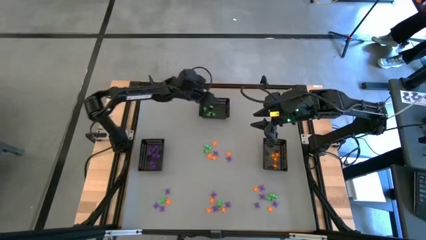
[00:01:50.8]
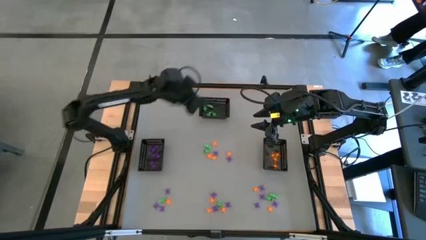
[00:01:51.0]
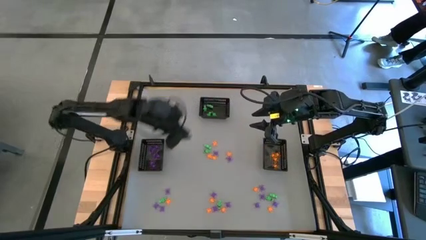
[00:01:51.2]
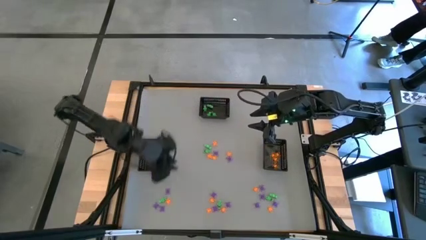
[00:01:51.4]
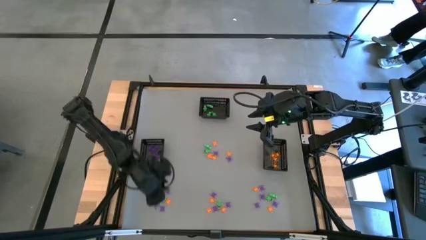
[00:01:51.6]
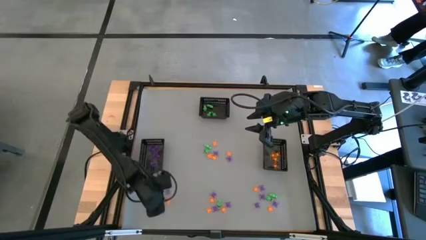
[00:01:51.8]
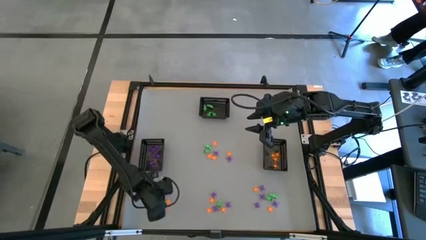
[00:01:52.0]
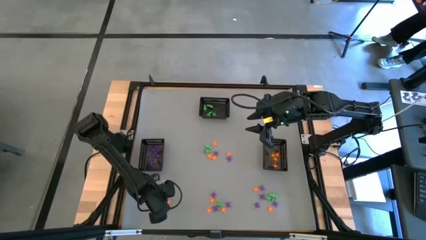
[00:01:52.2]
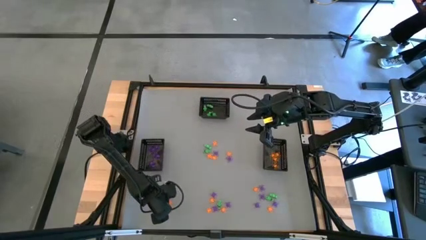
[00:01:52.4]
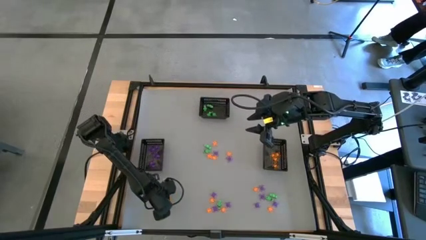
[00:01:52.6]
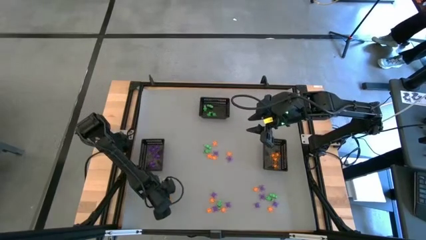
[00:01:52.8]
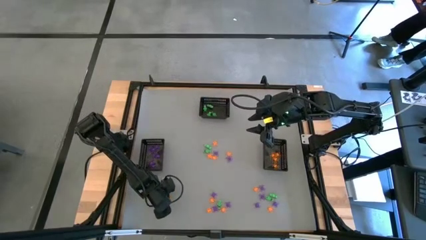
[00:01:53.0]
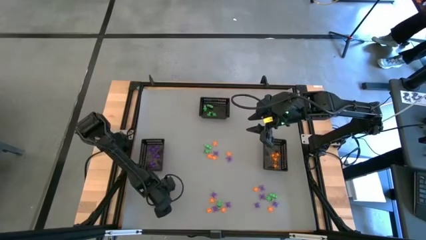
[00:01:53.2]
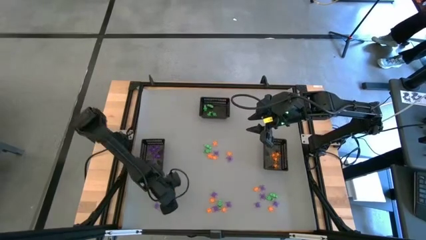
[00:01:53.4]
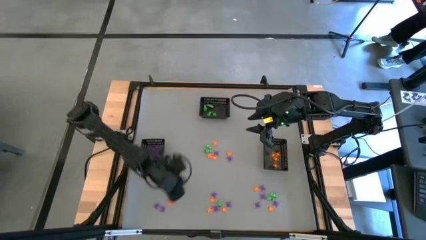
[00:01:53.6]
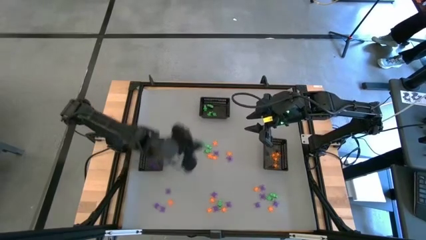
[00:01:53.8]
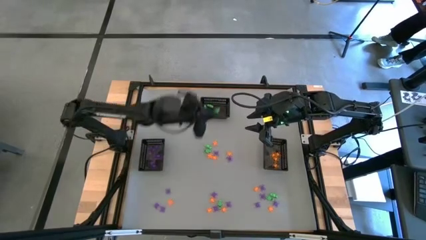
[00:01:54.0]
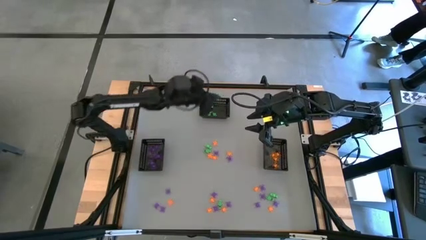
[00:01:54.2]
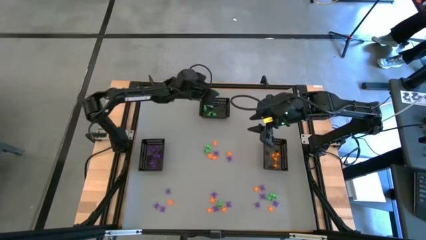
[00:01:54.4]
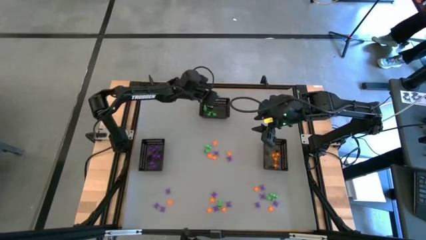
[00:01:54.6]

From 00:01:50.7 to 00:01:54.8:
Task: Sort Halloween decoration
Put the green skeleton toy into the top bin

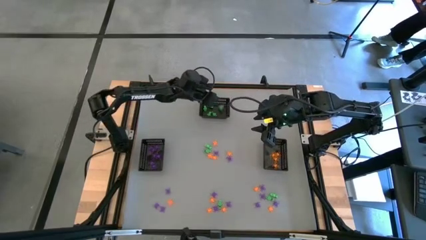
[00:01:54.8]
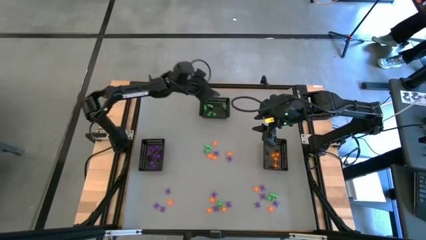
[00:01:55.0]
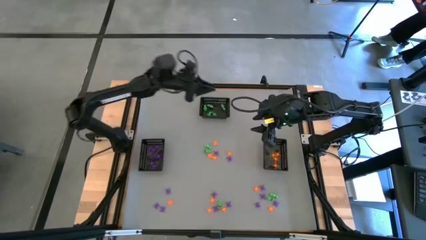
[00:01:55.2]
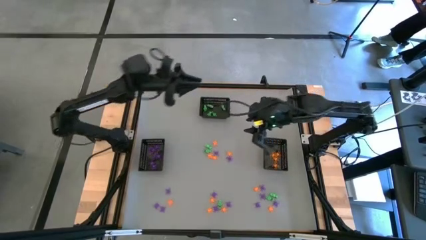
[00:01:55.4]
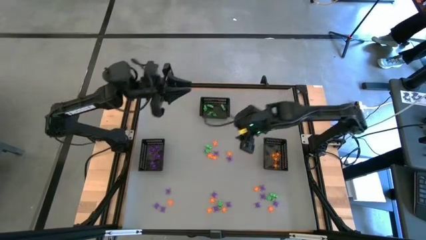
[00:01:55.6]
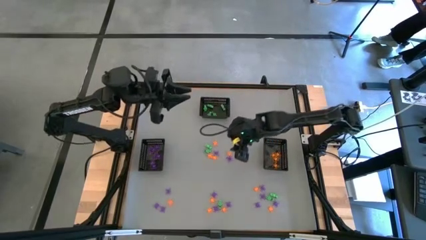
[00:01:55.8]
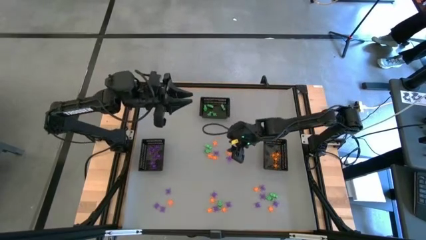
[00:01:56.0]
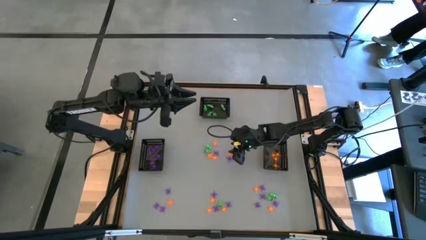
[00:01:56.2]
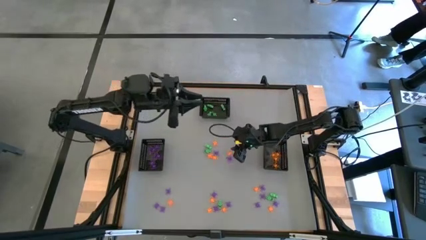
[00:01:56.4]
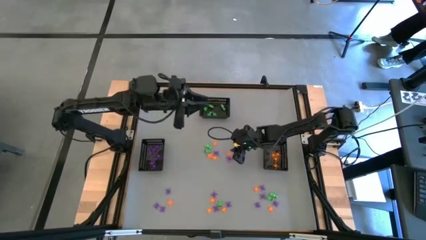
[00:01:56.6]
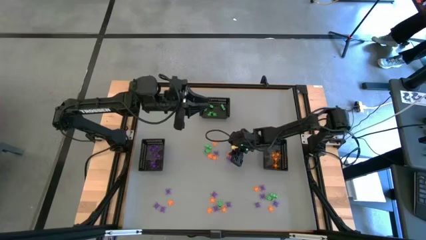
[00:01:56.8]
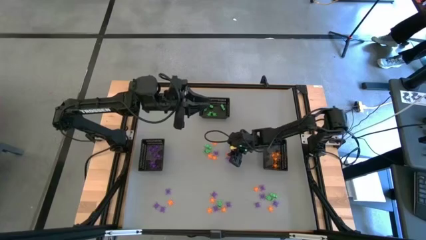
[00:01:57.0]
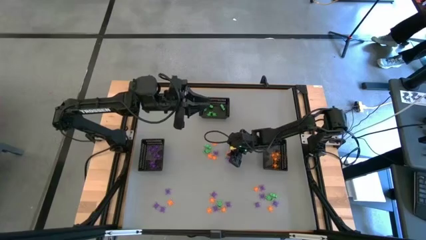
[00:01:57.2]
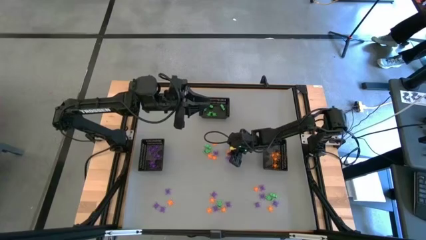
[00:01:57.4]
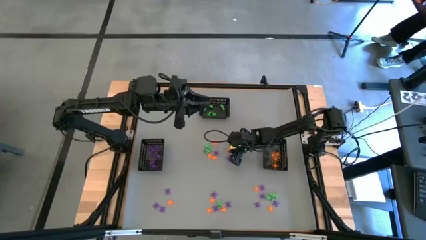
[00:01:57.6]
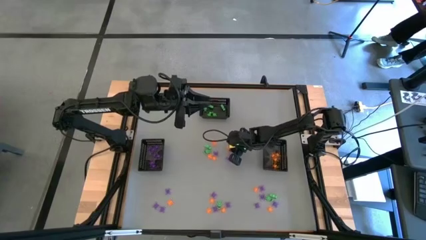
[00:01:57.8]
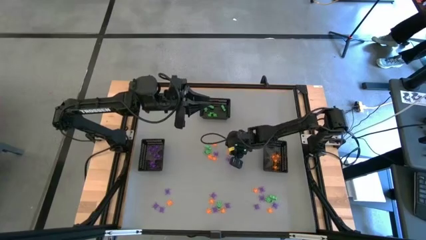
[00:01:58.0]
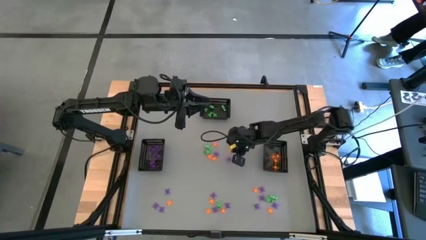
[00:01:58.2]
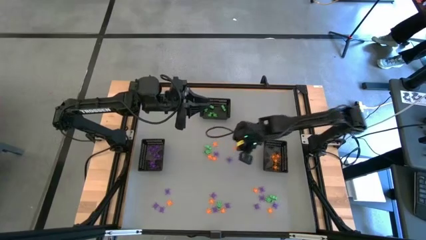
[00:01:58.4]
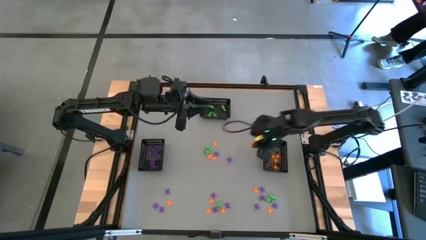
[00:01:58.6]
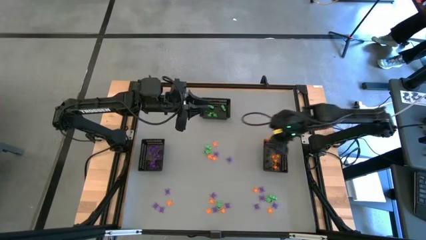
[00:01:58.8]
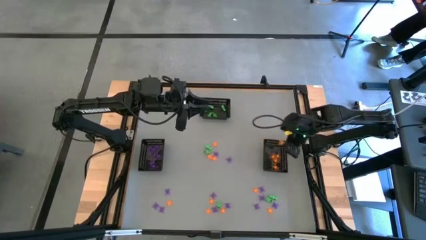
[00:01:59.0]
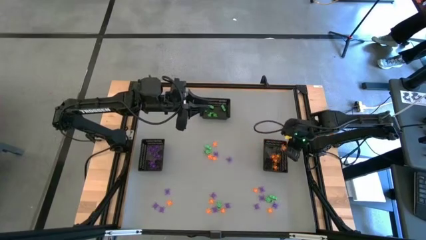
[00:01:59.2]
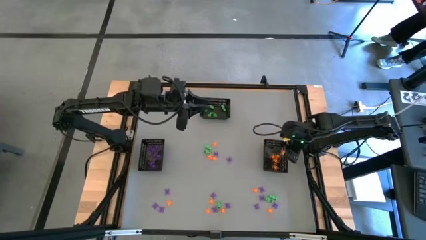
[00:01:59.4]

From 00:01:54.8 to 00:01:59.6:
Put the orange spider toy into the right bin

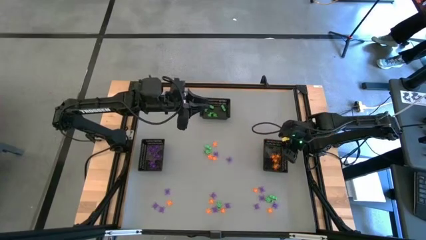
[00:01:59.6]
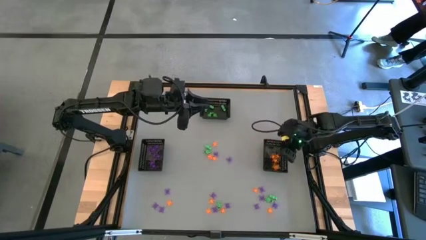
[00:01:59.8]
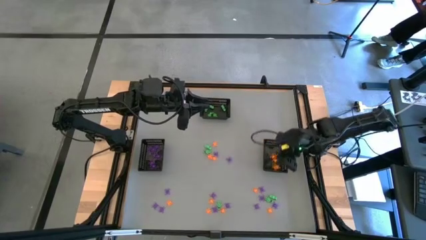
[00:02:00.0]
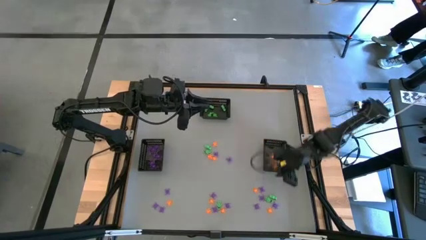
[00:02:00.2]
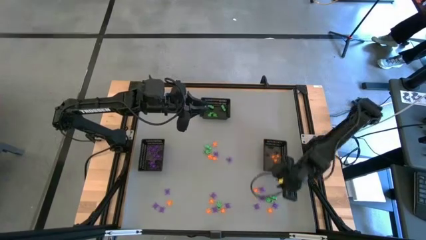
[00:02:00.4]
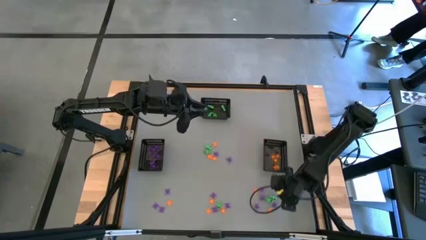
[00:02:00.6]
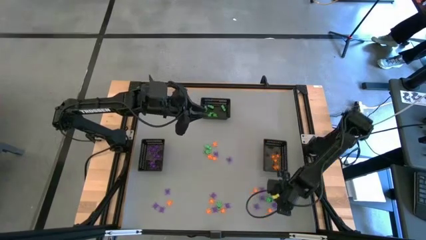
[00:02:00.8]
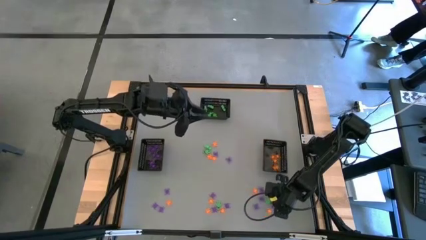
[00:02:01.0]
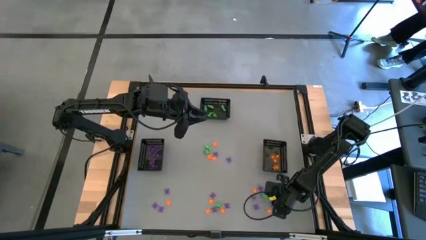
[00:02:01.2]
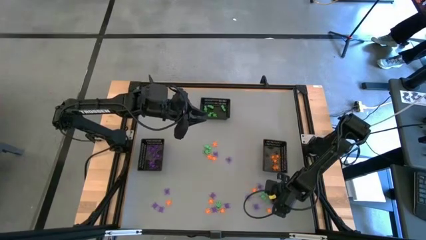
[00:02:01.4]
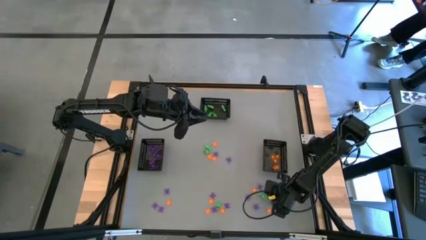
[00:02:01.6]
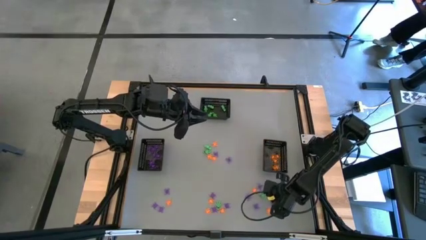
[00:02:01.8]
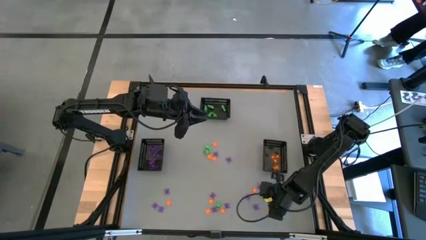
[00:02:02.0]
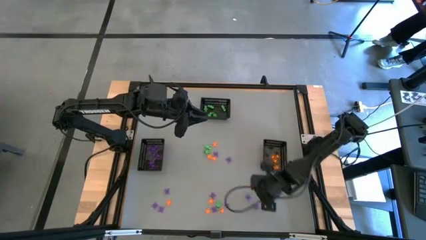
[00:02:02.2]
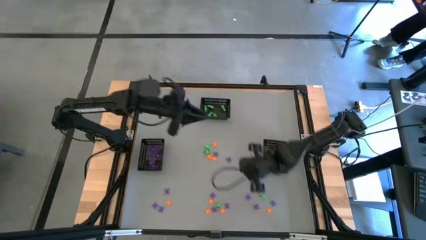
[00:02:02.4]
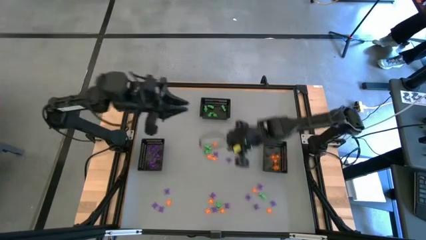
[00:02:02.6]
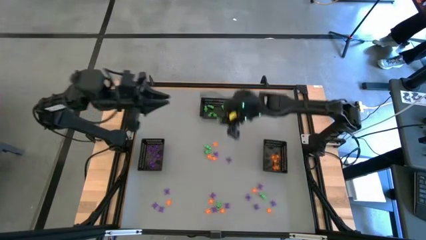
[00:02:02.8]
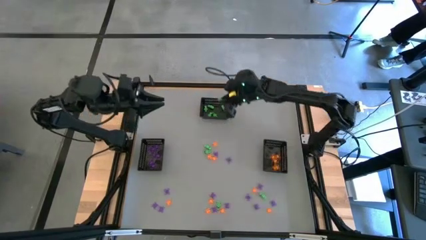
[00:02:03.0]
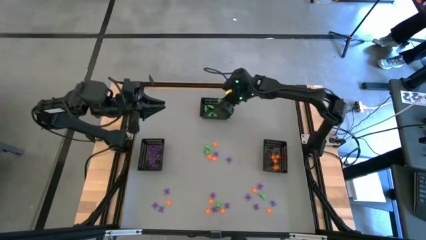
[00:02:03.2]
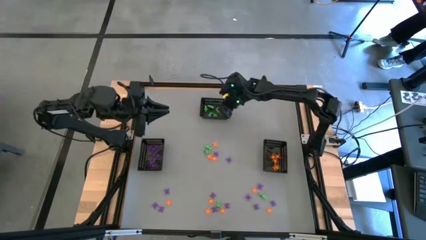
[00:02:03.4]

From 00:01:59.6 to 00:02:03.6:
Put the green skeleton toy into the top bin

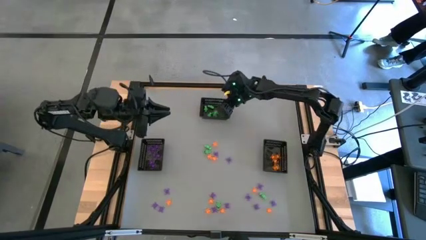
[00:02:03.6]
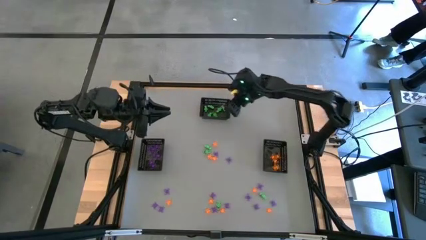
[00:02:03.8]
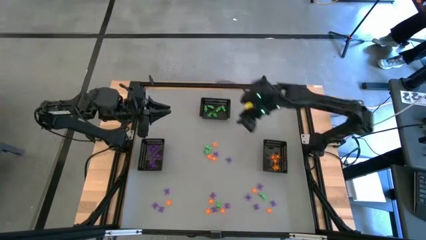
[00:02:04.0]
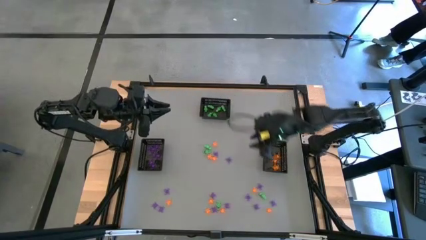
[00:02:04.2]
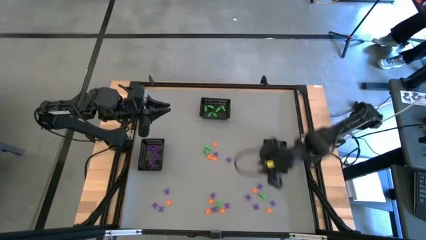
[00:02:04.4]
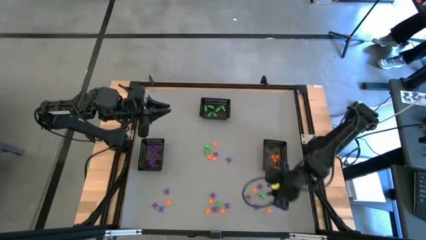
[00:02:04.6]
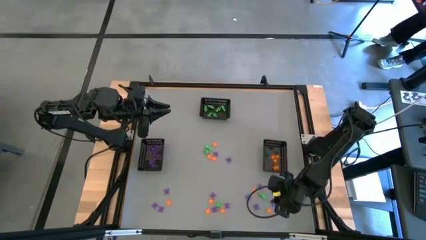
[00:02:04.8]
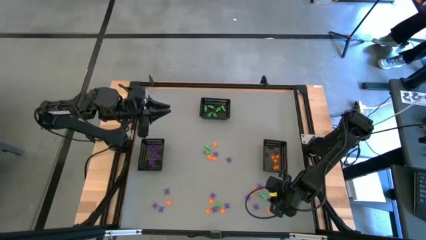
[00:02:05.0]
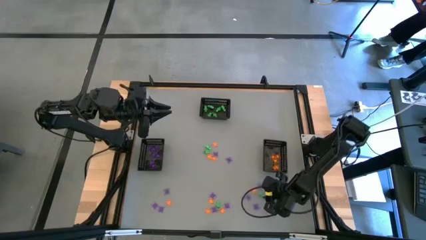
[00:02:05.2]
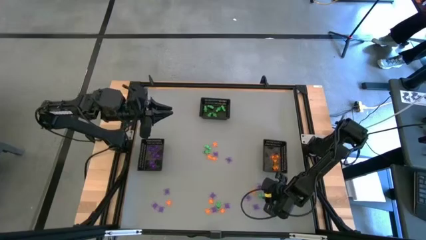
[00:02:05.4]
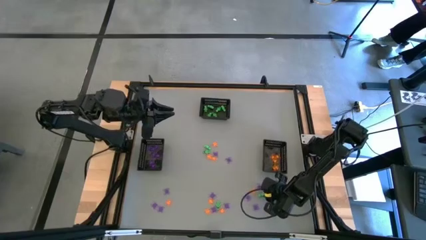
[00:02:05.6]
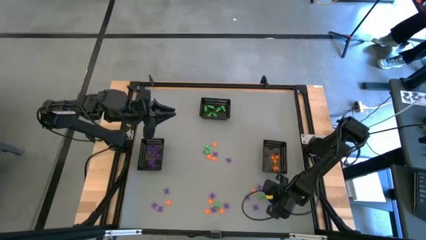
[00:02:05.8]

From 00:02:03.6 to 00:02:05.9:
Put the green skeleton toy into the top bin
